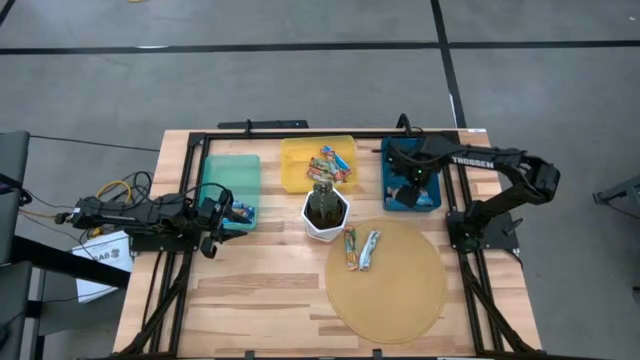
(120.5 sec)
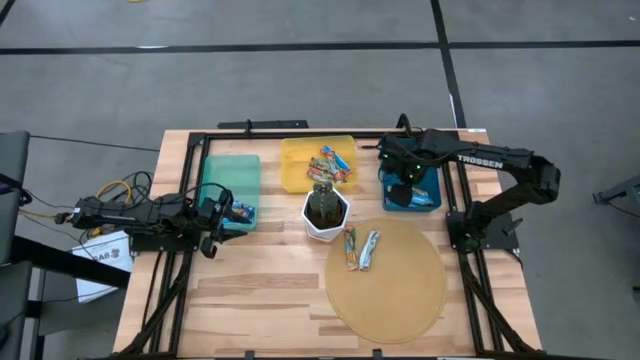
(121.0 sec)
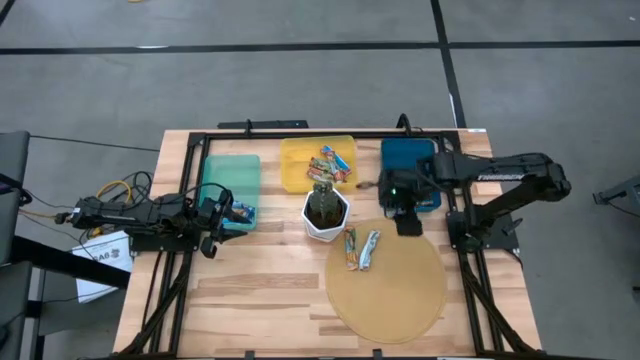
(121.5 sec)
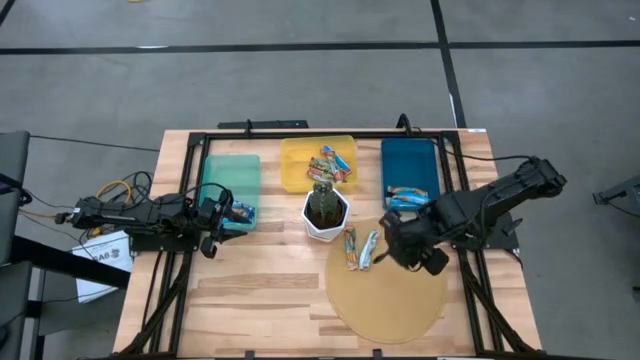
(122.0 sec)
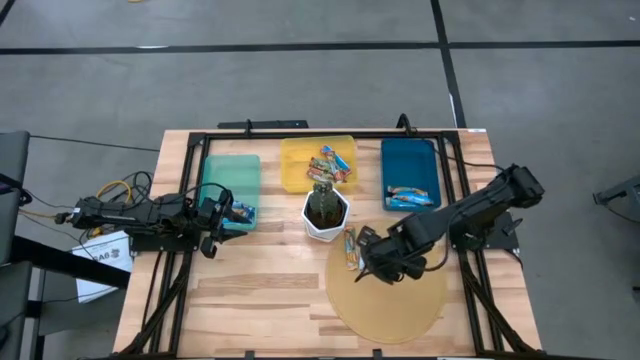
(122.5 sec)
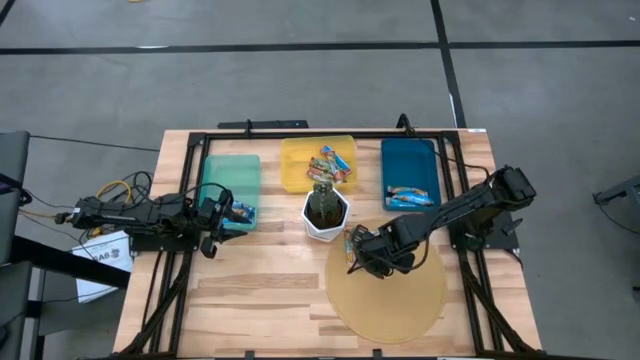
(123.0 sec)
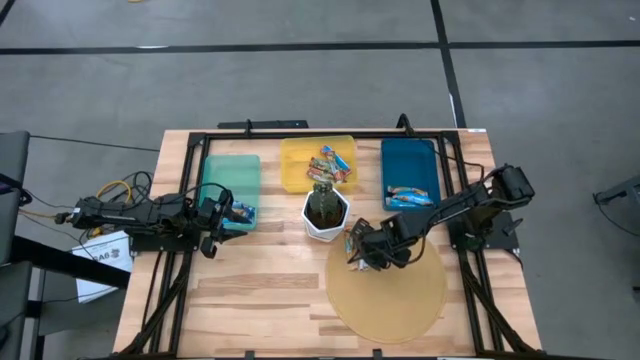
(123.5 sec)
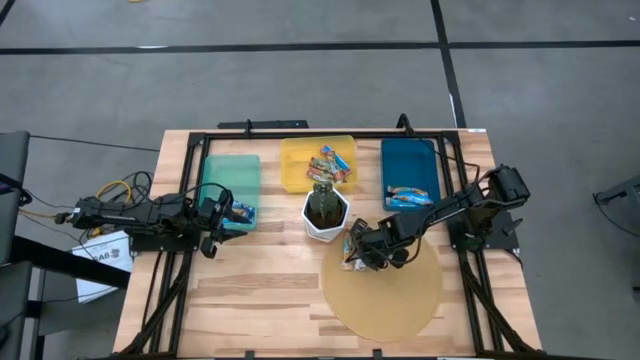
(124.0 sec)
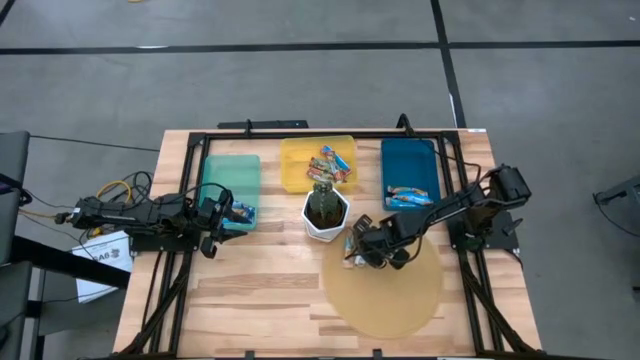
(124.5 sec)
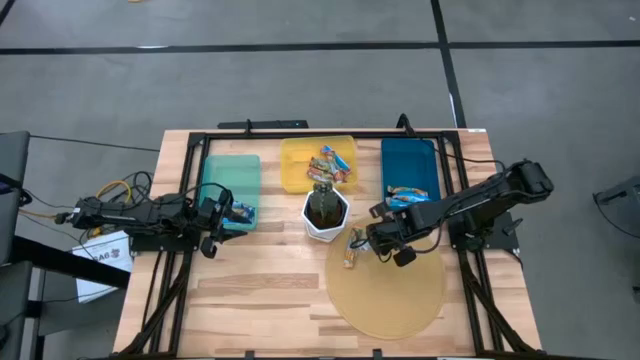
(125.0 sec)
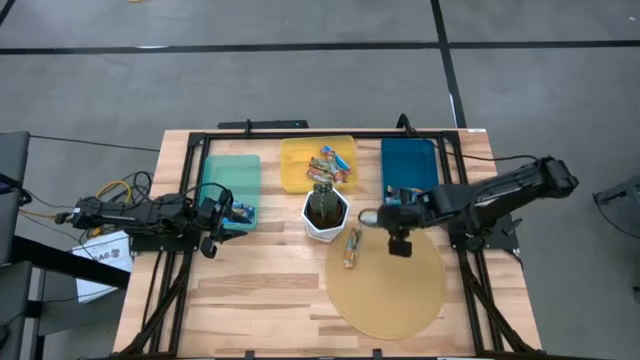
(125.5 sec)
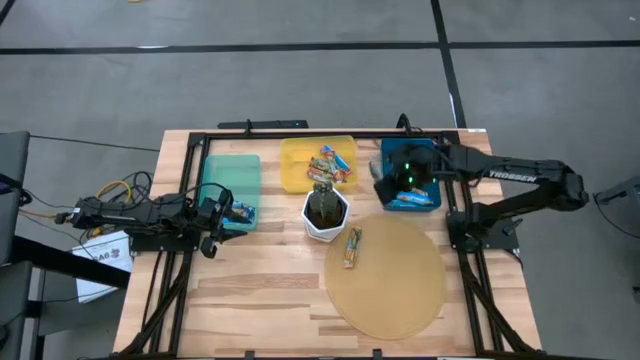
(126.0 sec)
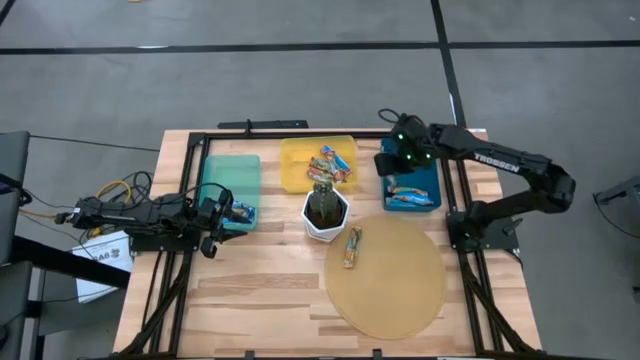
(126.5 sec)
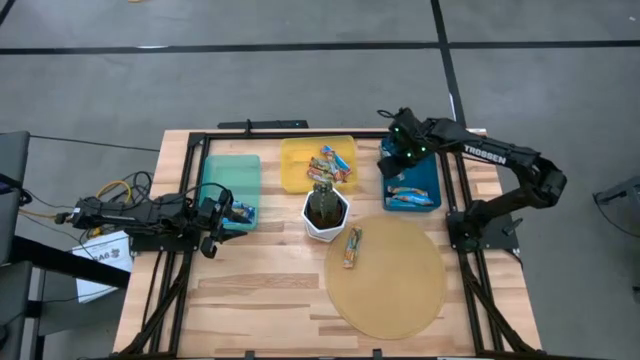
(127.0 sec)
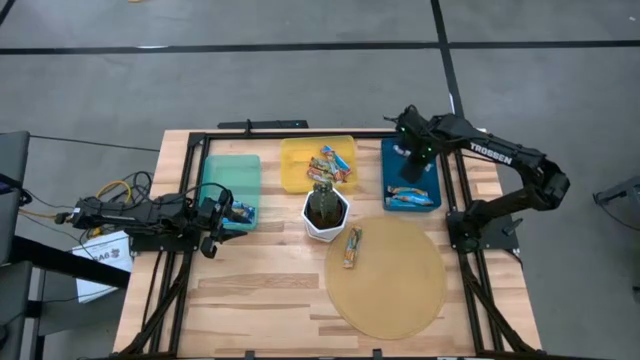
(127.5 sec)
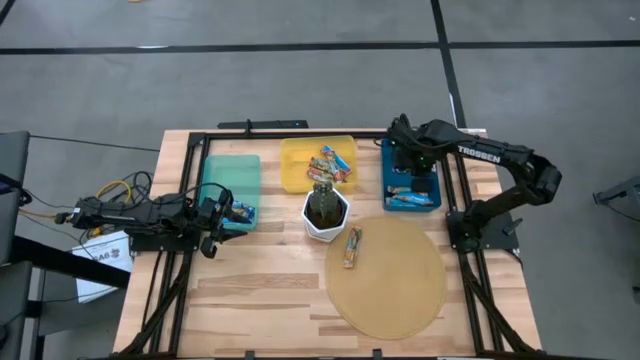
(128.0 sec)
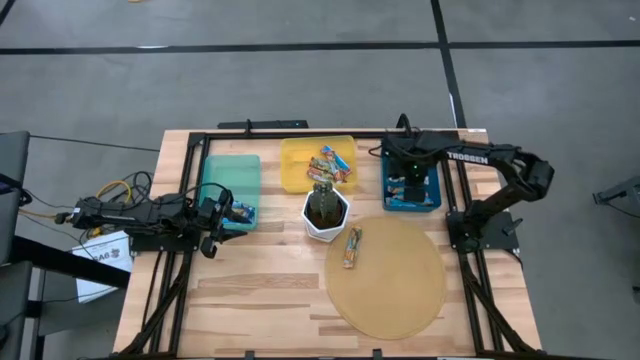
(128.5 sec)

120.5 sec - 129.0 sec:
Task: Pick and place Granola Bars by type
Put the orange granola bar into the blue bin

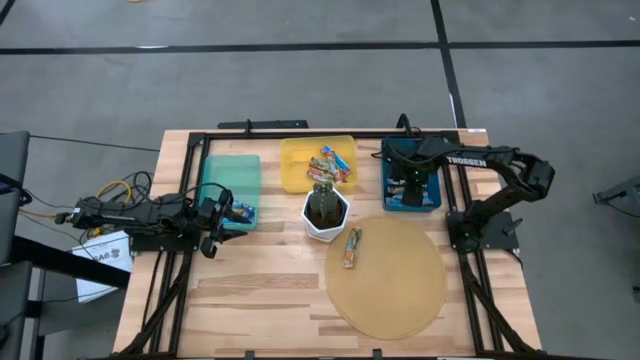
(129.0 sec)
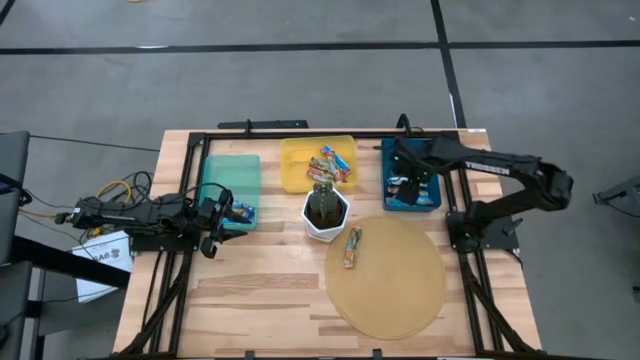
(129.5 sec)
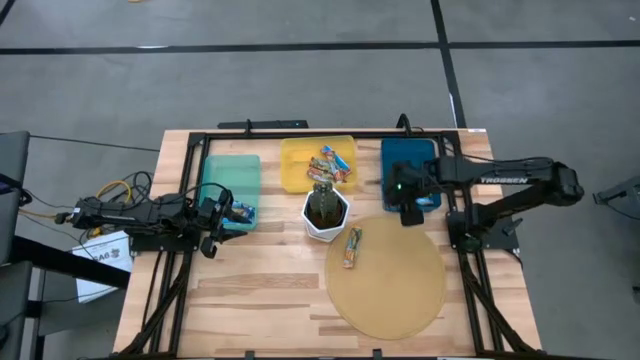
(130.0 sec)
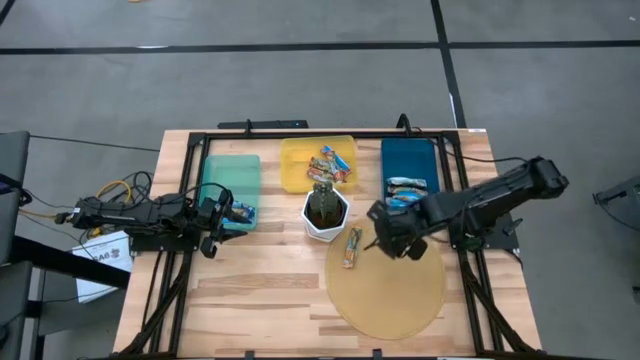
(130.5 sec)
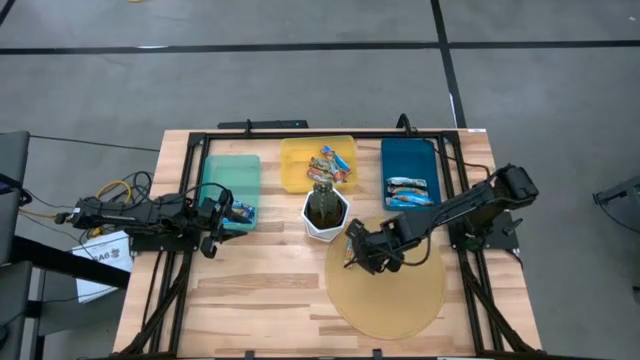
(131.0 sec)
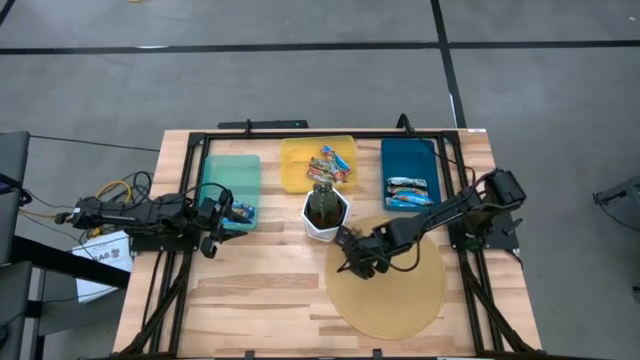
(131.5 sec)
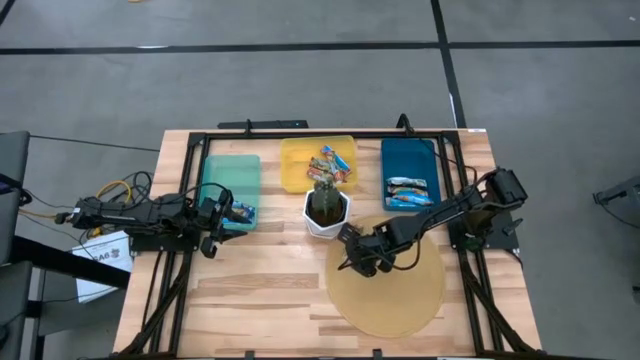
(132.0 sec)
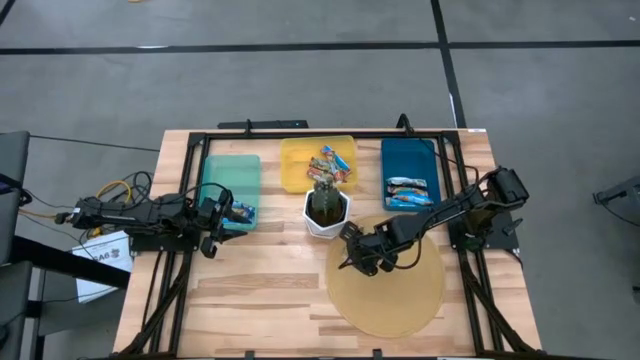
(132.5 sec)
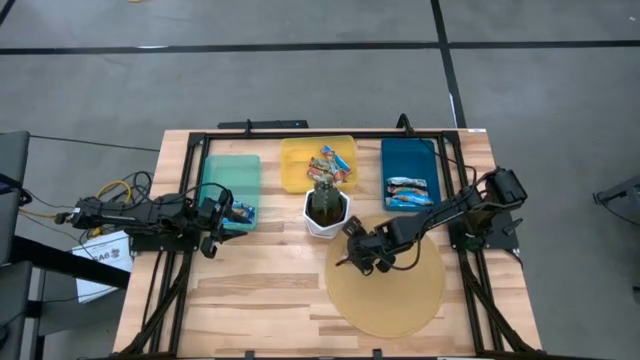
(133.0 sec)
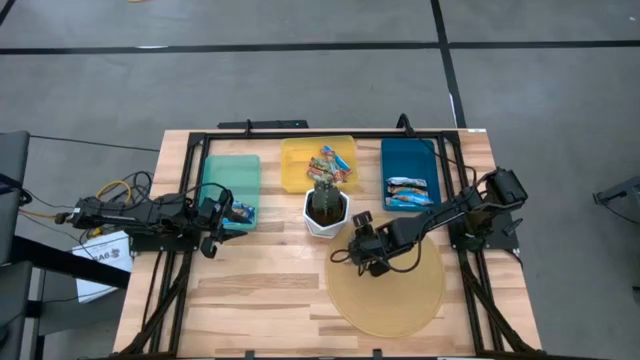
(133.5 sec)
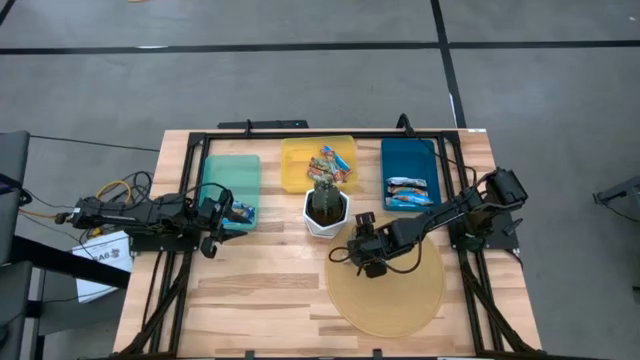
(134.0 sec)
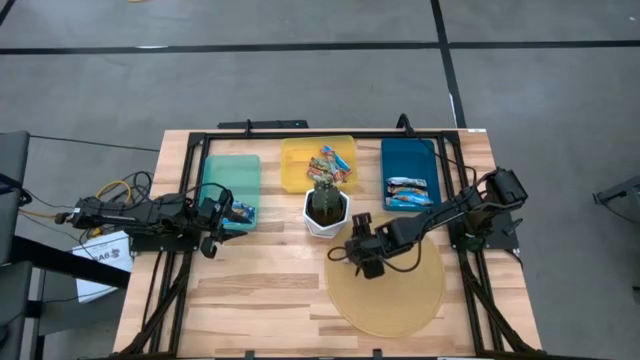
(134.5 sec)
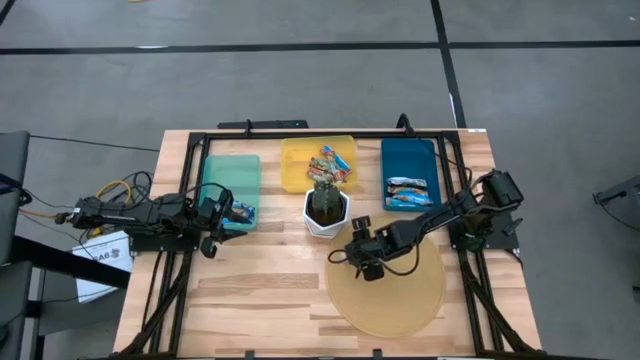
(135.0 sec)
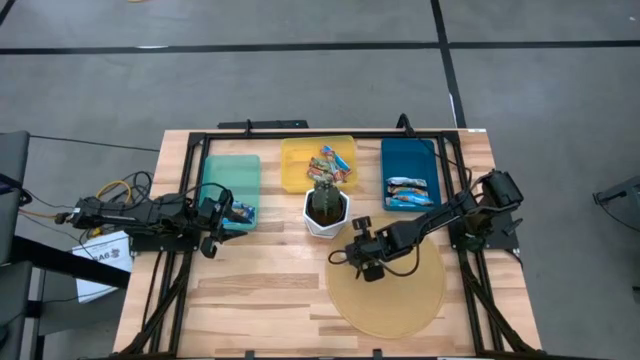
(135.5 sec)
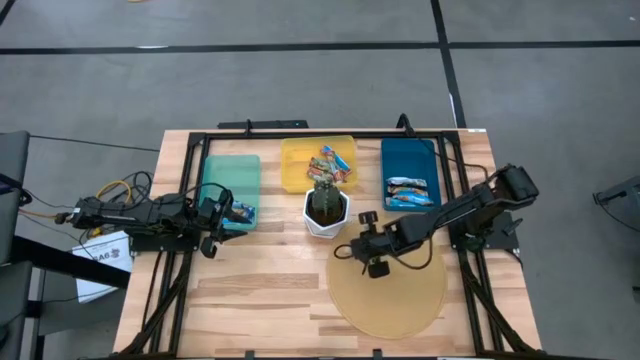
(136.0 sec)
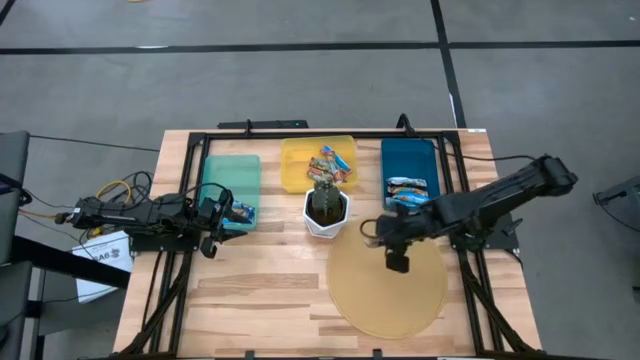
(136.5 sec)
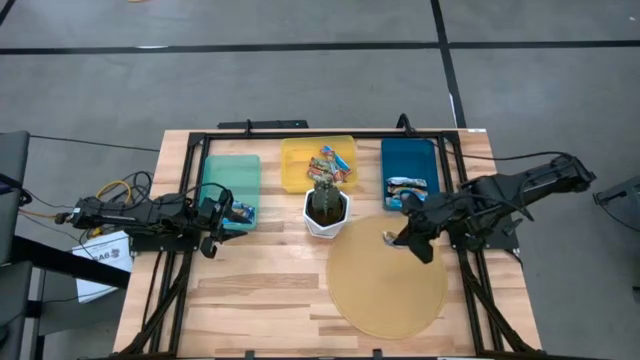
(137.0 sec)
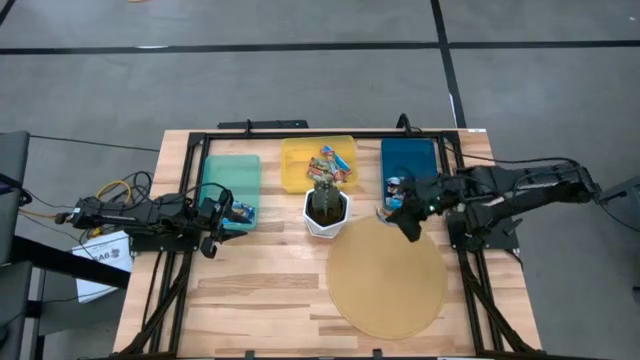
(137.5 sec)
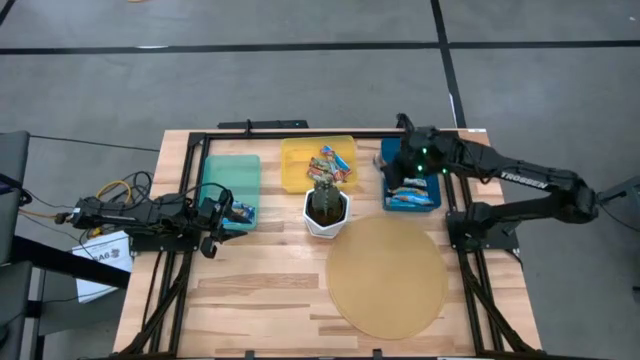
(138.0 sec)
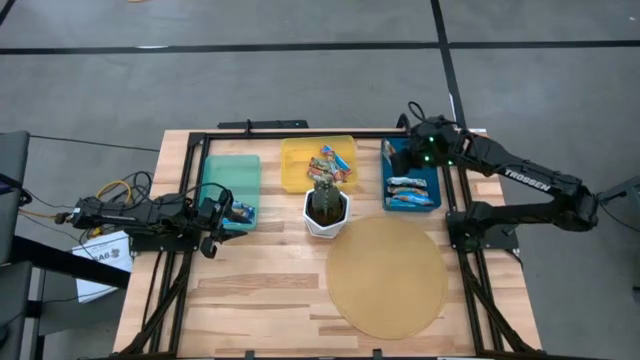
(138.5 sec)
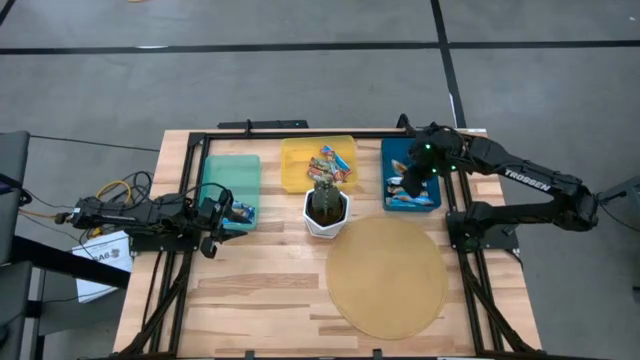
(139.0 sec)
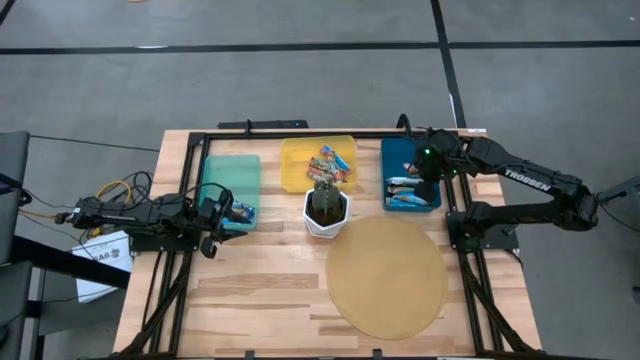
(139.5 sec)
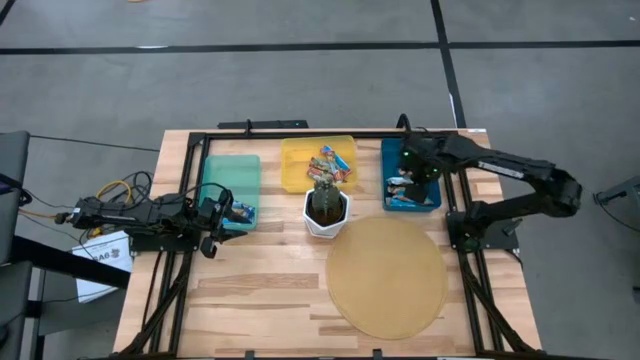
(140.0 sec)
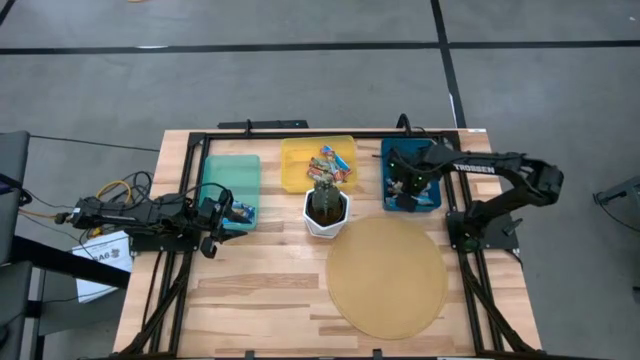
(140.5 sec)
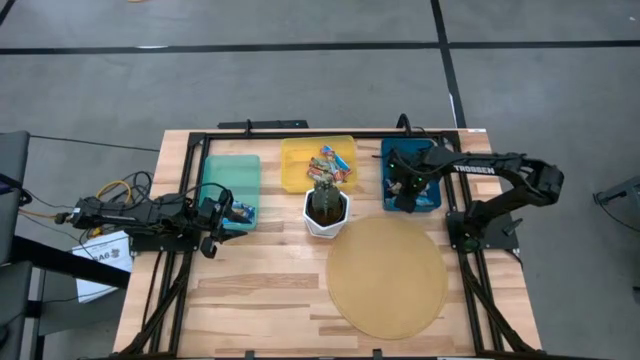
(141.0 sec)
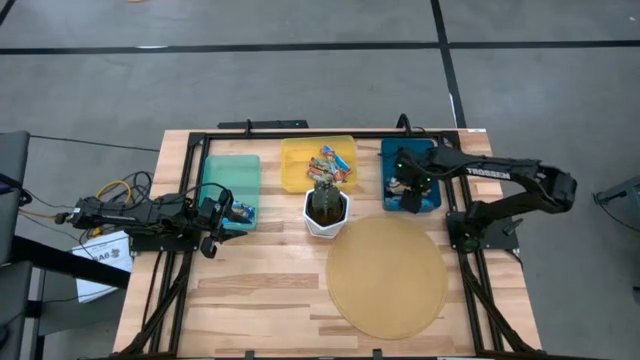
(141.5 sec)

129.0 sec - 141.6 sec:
Put the orange granola bar into the blue bin
